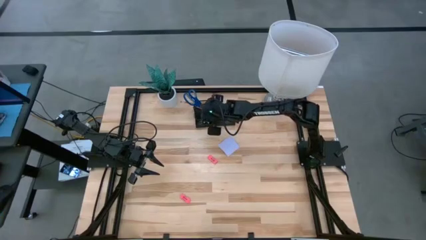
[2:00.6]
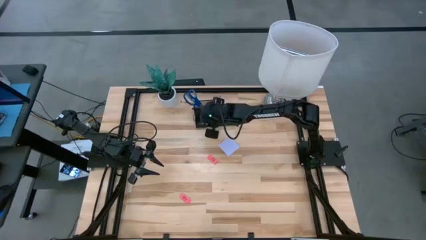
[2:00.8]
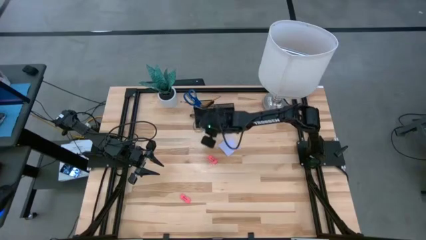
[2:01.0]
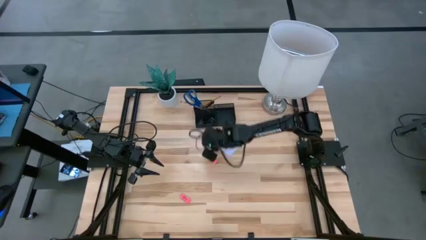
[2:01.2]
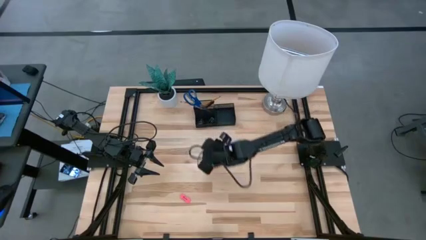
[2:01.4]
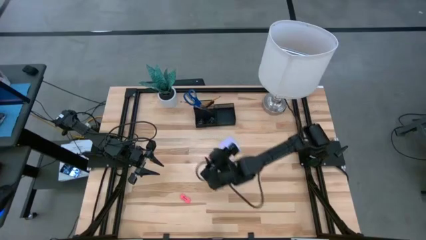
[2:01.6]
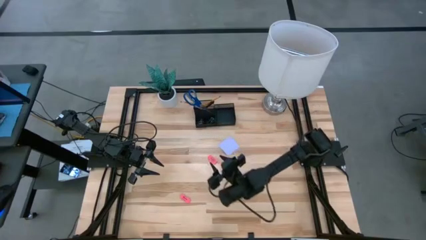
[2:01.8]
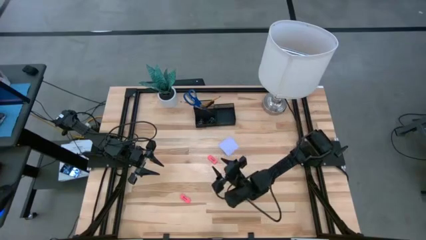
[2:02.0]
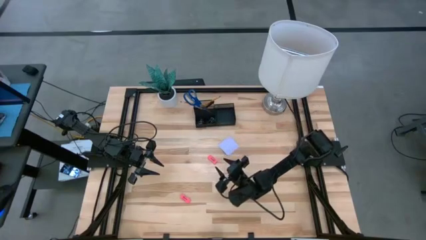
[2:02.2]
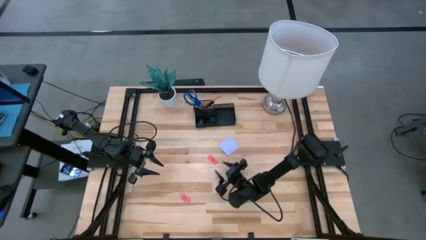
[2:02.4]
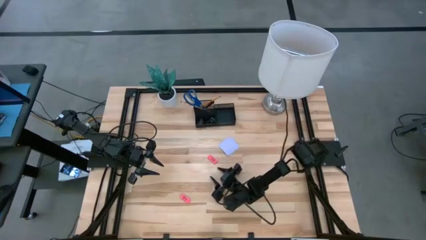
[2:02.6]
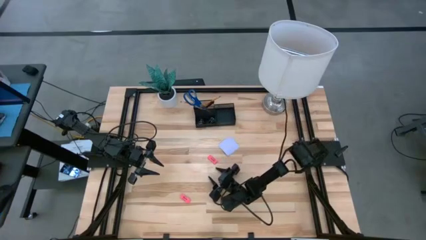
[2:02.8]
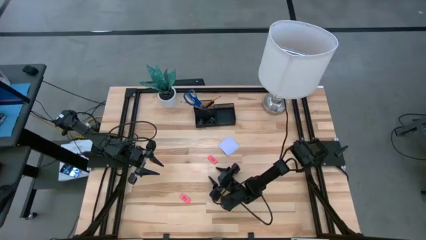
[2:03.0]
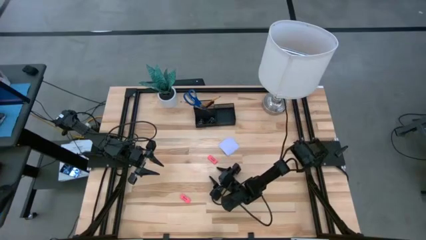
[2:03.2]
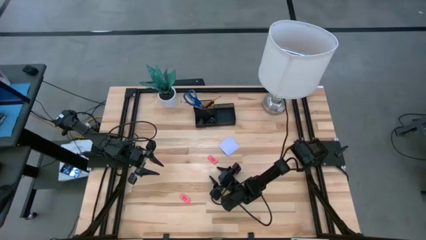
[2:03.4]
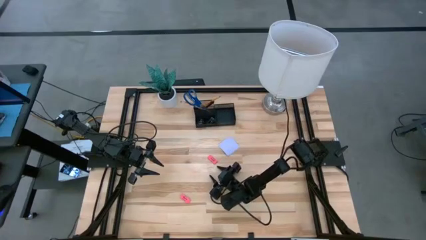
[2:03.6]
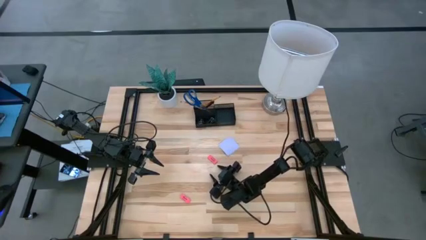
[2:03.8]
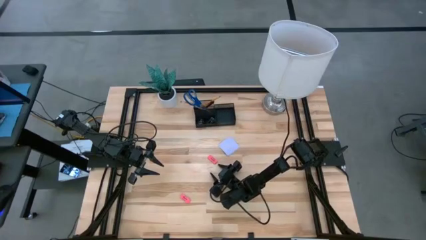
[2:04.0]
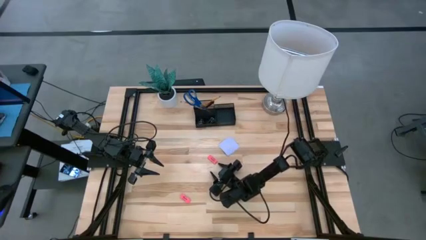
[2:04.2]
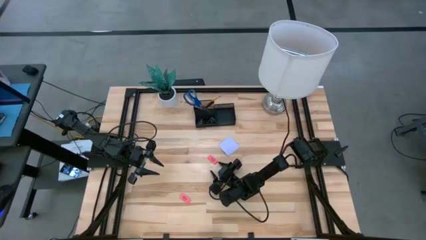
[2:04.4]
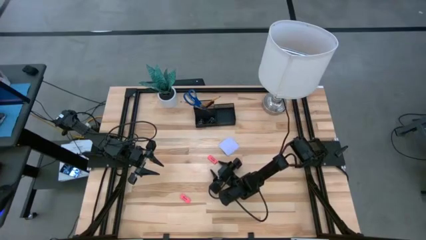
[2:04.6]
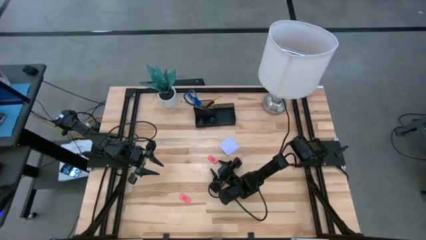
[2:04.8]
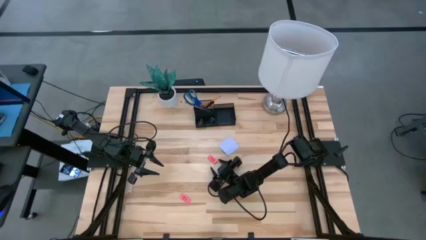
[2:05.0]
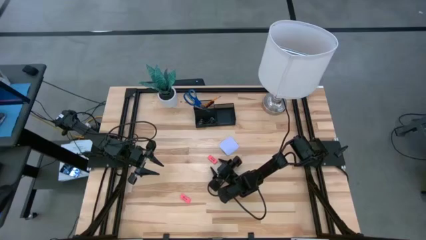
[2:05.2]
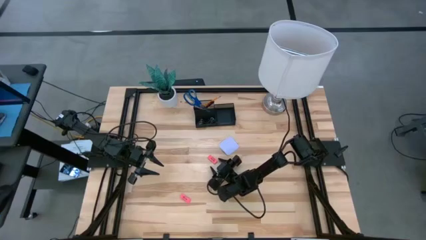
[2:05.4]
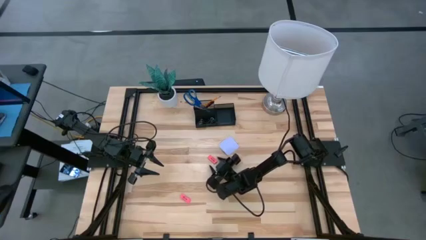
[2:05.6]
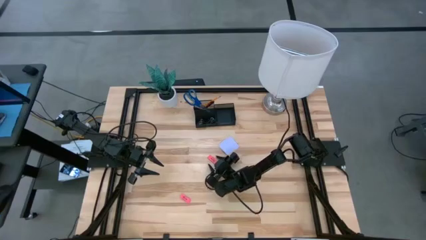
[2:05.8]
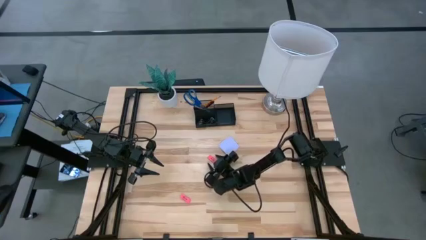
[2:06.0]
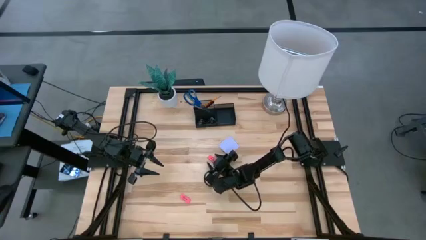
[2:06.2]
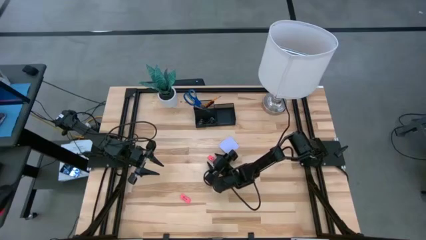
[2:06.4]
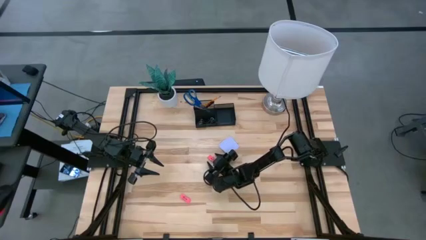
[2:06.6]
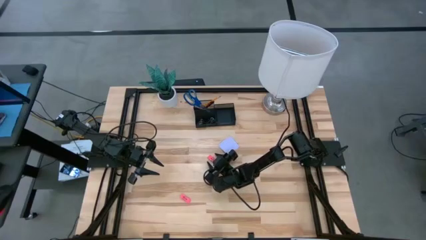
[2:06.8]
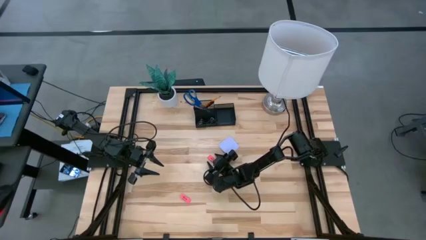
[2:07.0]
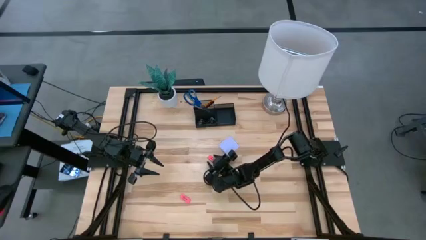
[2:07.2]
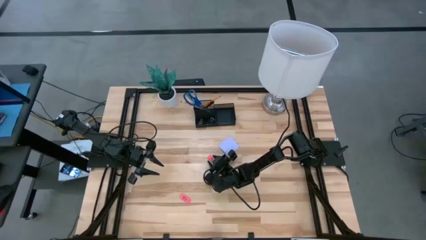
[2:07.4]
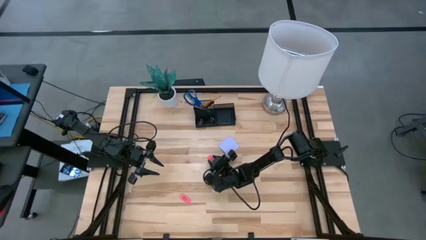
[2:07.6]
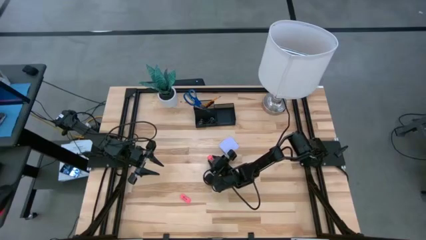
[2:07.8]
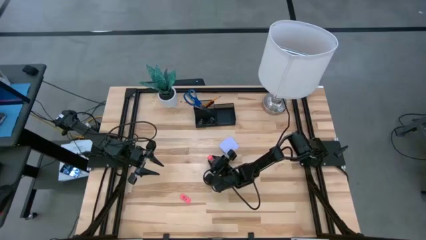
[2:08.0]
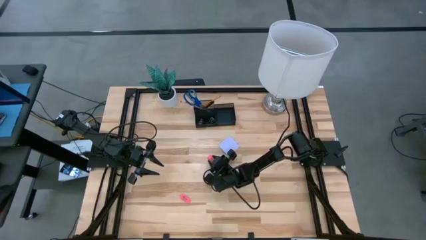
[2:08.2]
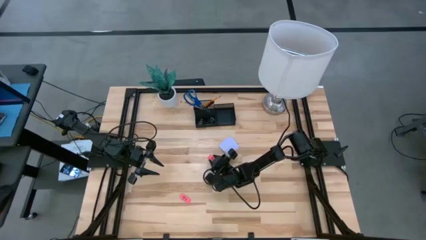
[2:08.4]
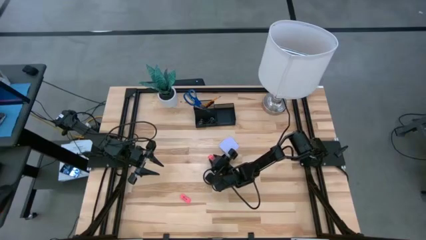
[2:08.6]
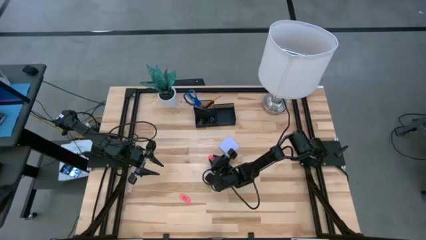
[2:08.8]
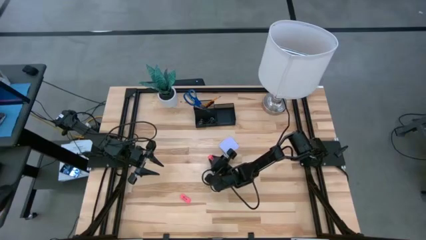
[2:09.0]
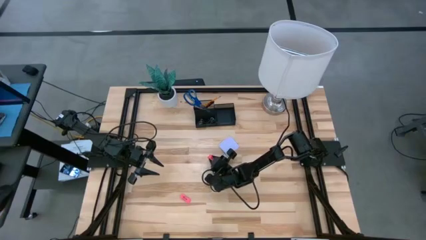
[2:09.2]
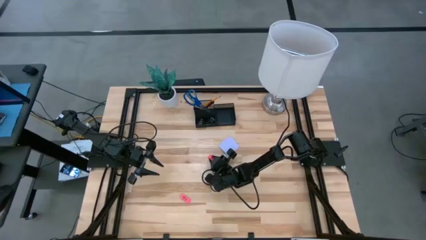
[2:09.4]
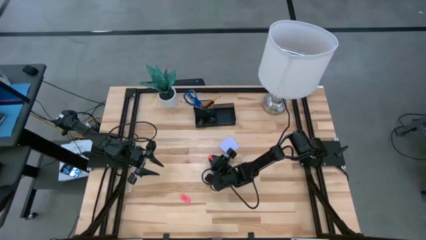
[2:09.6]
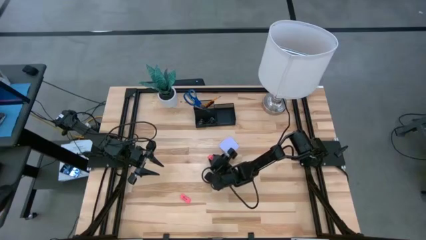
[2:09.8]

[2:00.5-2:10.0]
Task: Pick and place office supplies into organizer
Put the top pink eraser into the black desk organizer

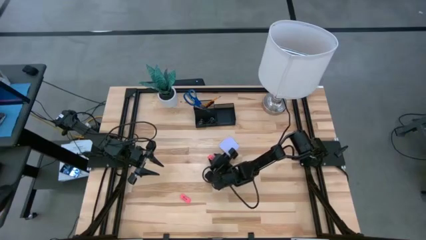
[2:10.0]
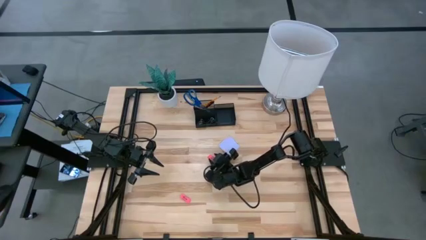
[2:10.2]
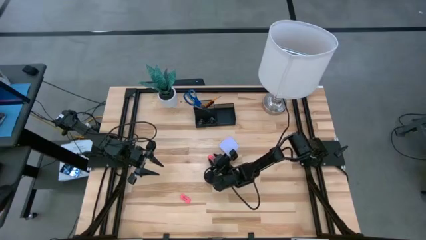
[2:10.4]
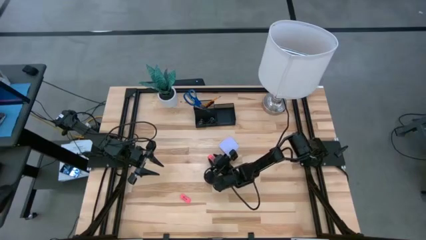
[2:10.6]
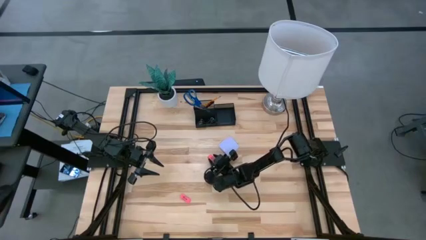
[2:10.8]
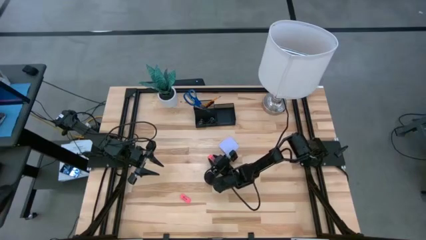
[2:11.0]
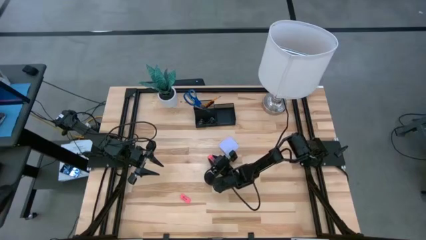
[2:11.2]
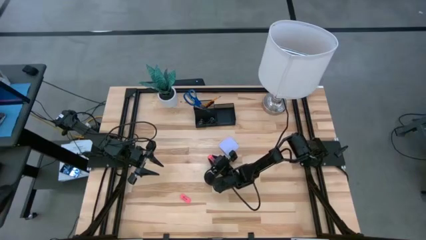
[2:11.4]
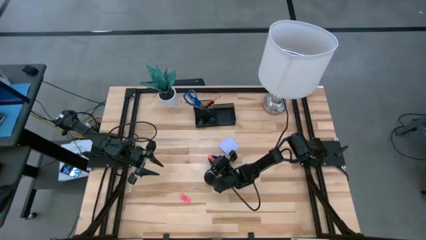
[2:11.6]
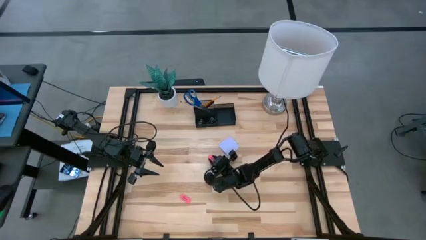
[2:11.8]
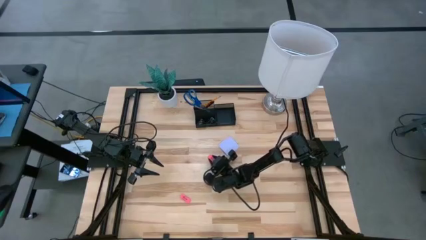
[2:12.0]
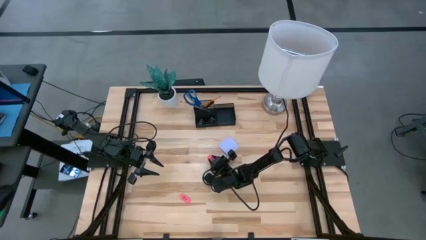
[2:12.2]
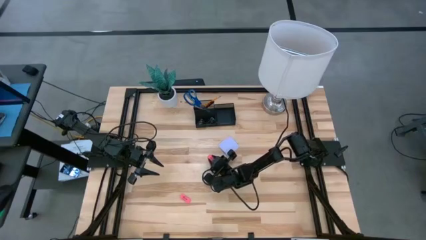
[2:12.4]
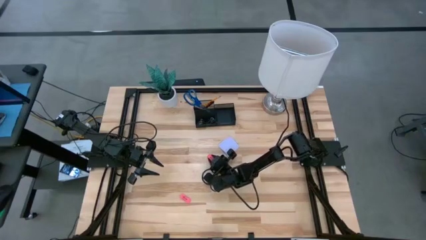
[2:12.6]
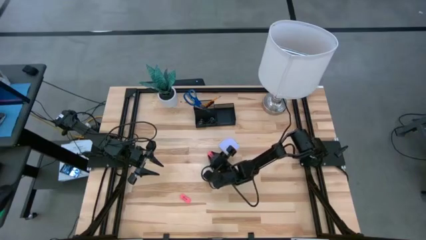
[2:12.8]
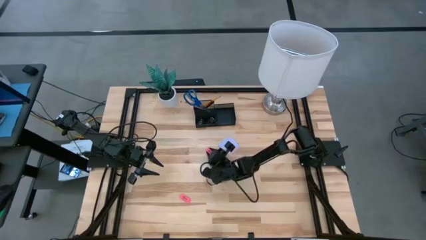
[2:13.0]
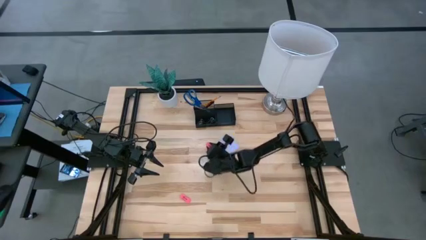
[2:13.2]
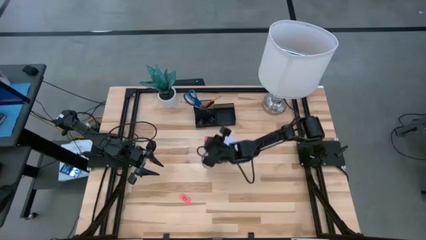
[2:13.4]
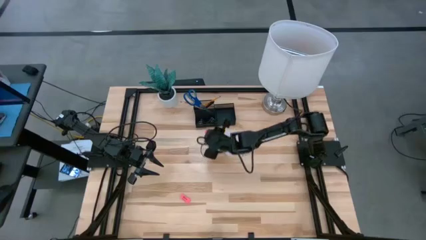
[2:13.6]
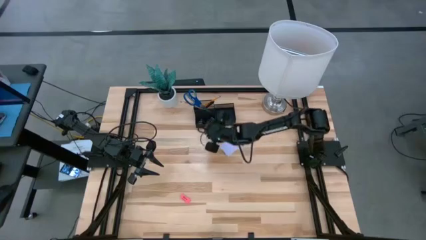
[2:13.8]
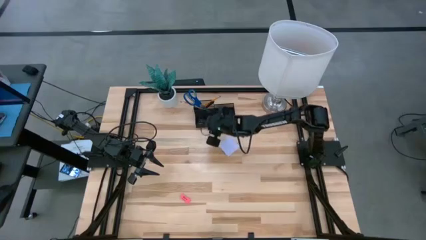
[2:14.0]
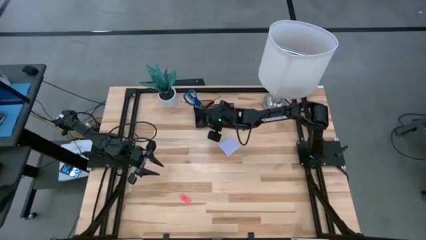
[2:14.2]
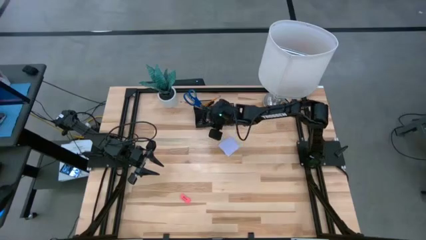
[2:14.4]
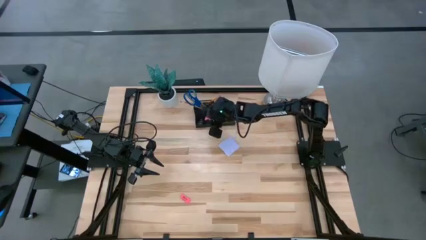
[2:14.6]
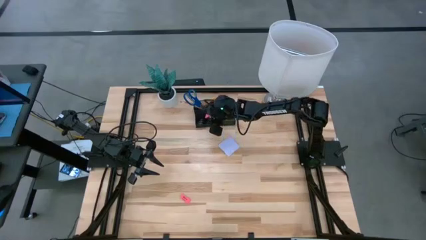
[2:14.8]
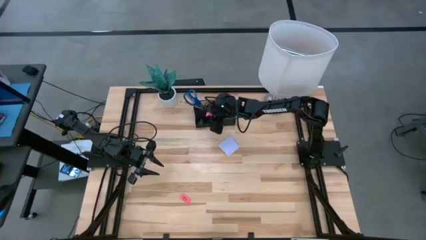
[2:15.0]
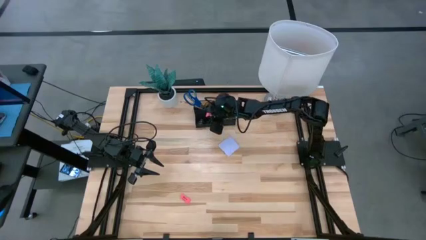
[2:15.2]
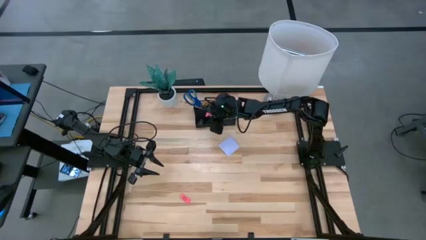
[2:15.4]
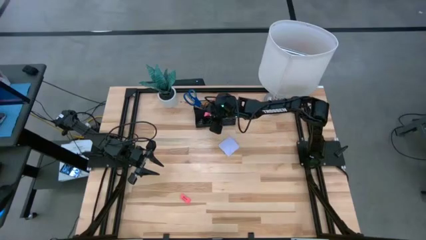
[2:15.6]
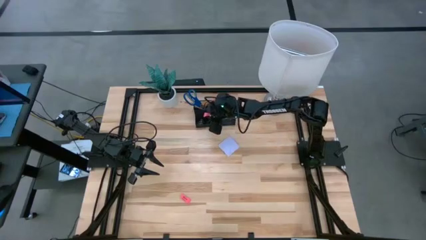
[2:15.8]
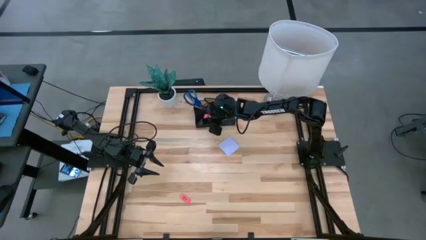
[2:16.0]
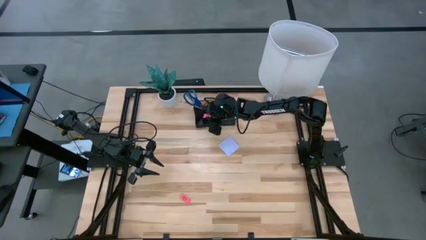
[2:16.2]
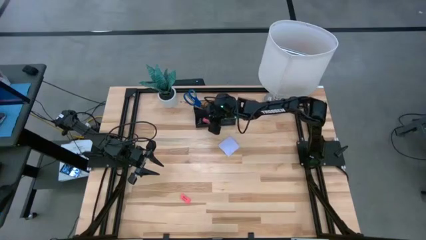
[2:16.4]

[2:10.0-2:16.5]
Put the top pink eraser into the black desk organizer
